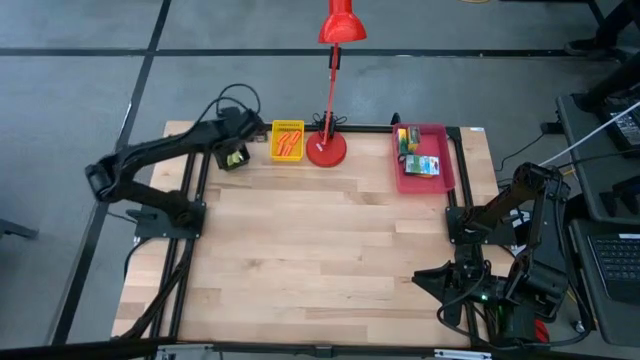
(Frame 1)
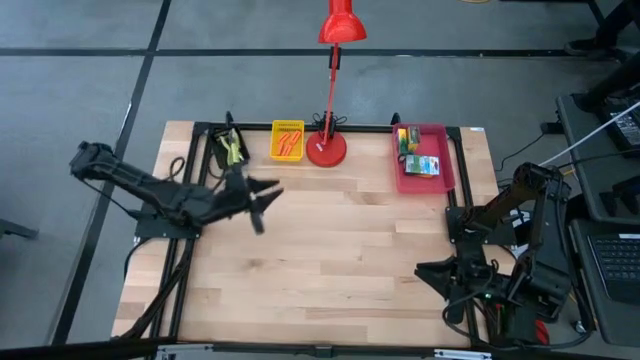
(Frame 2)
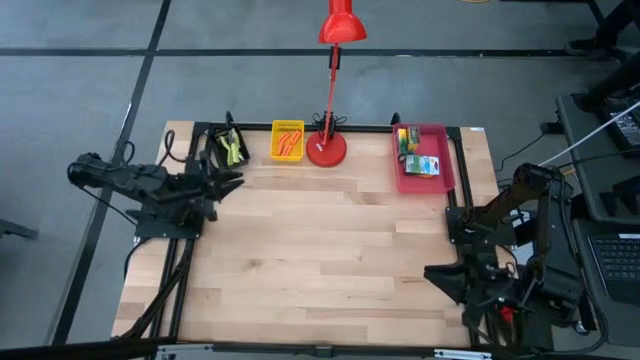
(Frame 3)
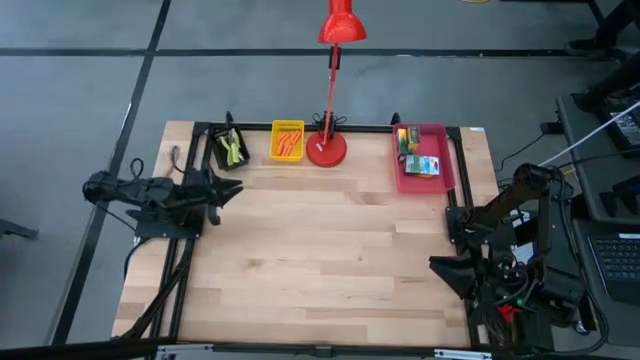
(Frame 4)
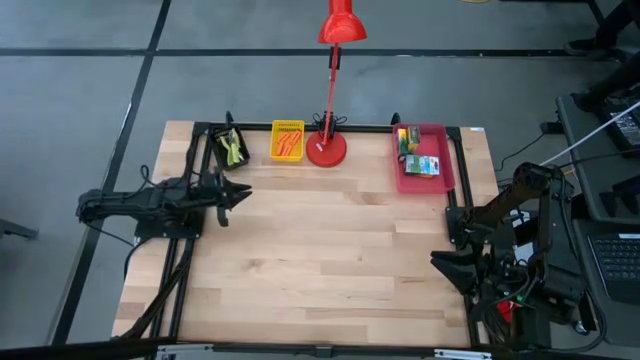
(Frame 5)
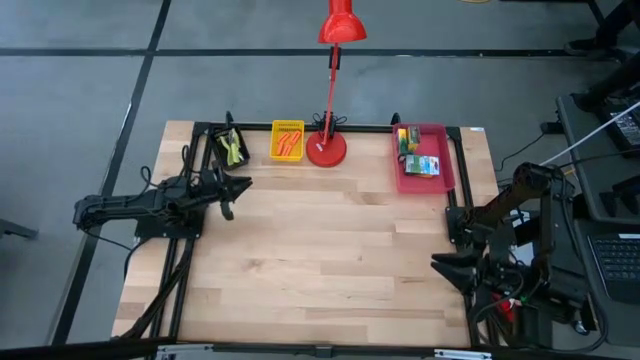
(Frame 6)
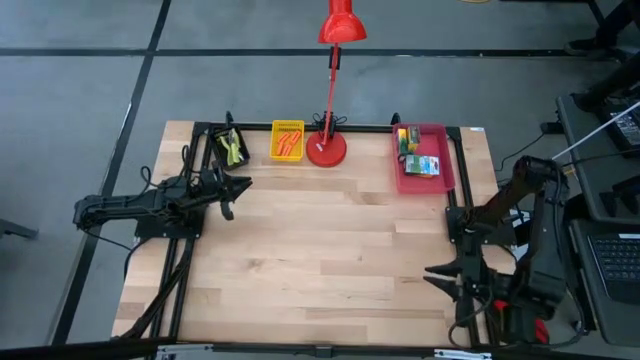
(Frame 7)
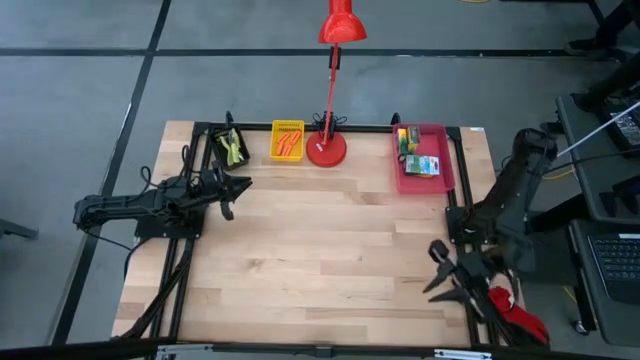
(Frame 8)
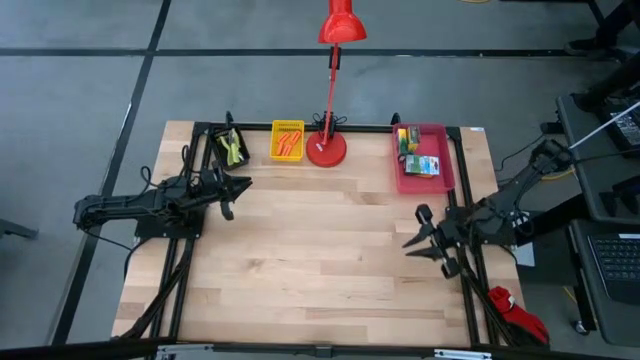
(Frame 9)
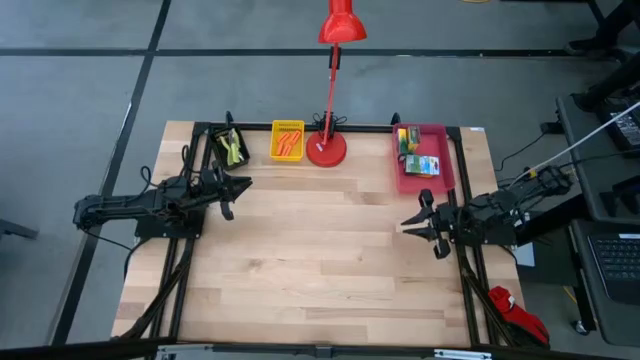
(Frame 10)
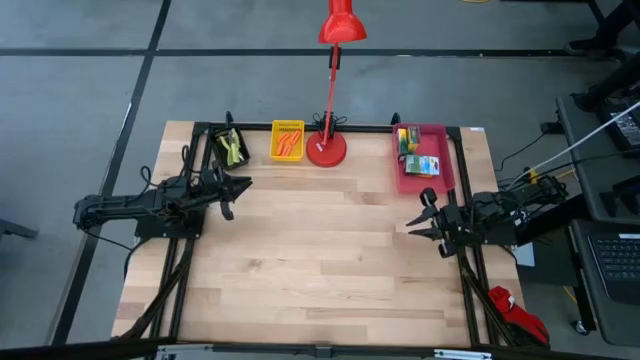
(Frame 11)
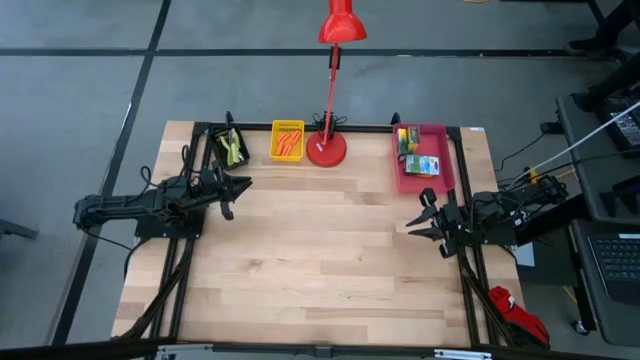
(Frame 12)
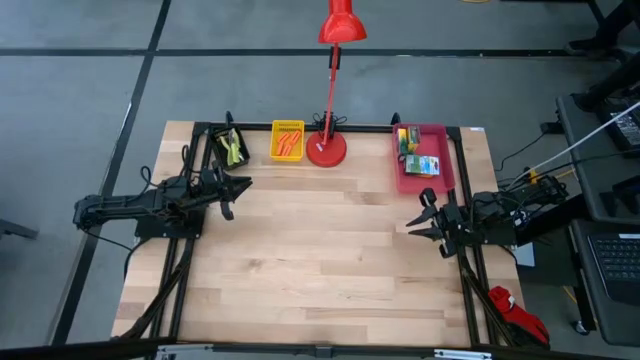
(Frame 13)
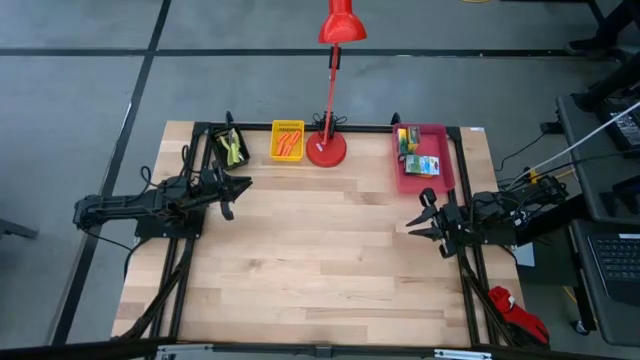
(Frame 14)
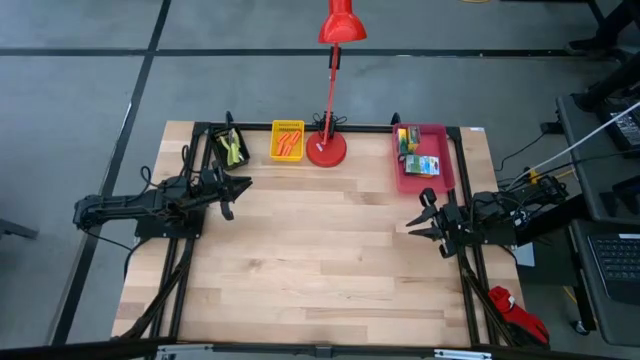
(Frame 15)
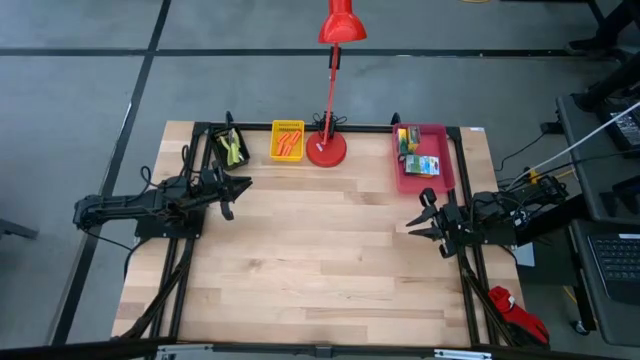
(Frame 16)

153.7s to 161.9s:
Task: Pick & Place School Supplies
Return to Home Position

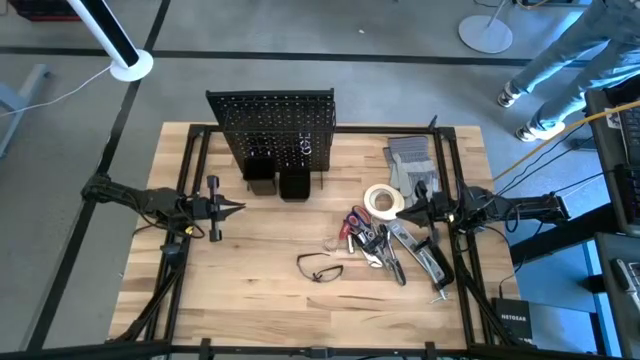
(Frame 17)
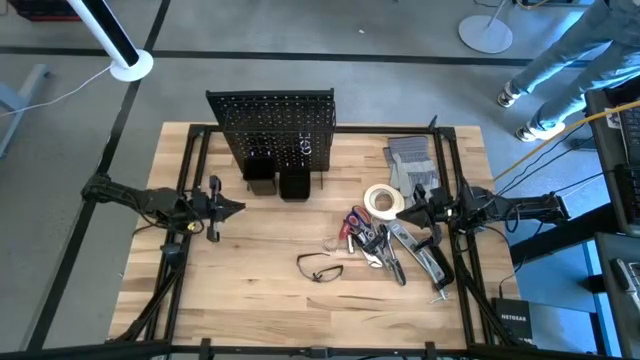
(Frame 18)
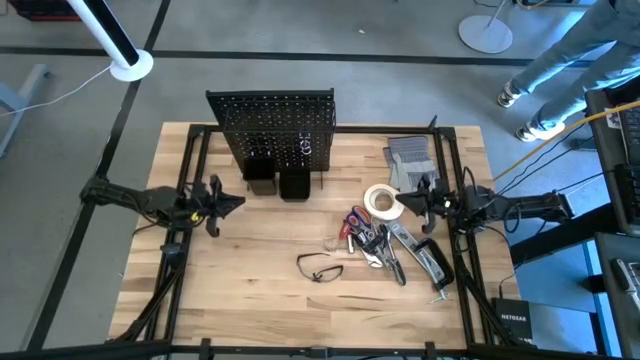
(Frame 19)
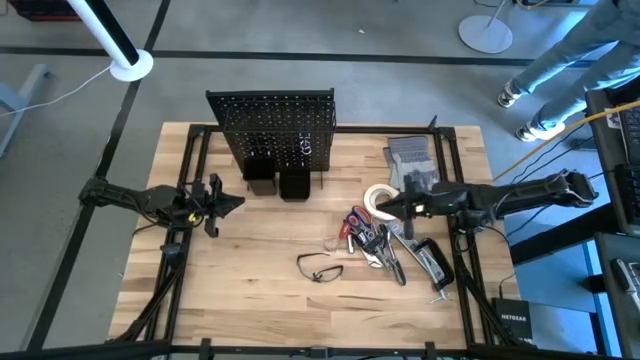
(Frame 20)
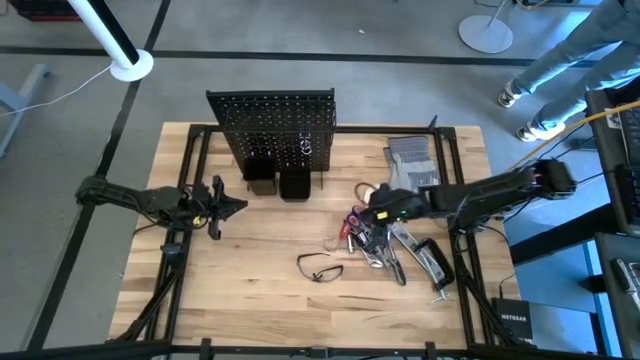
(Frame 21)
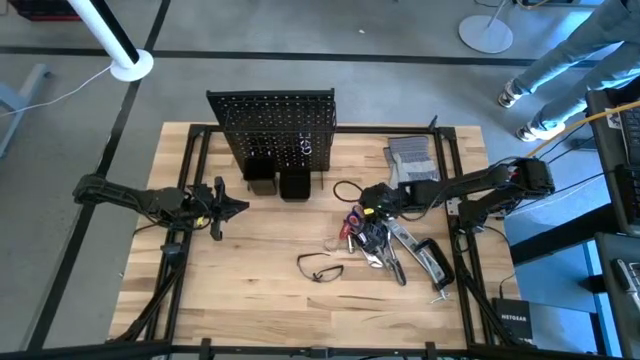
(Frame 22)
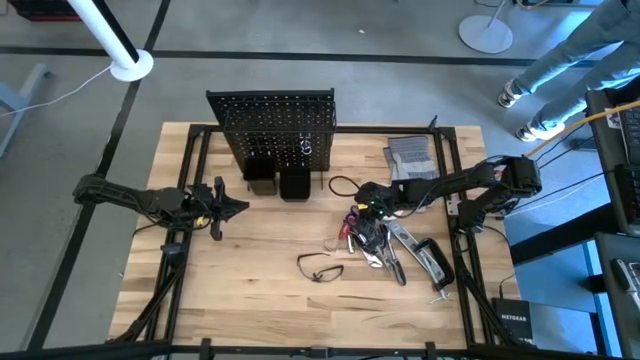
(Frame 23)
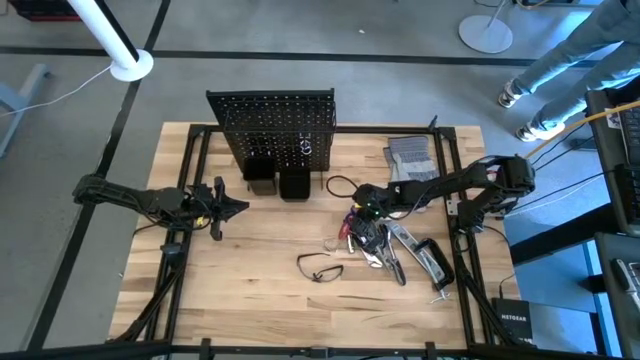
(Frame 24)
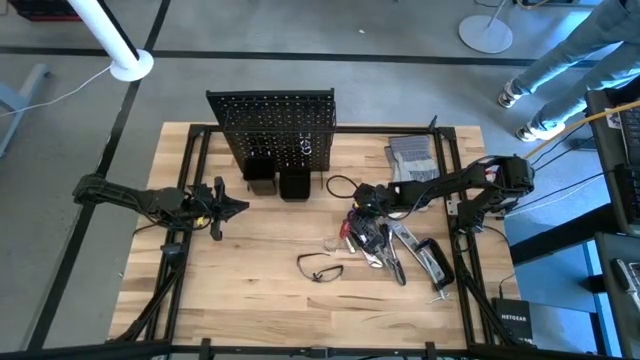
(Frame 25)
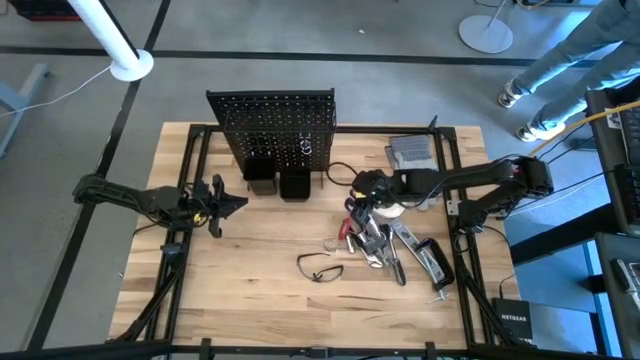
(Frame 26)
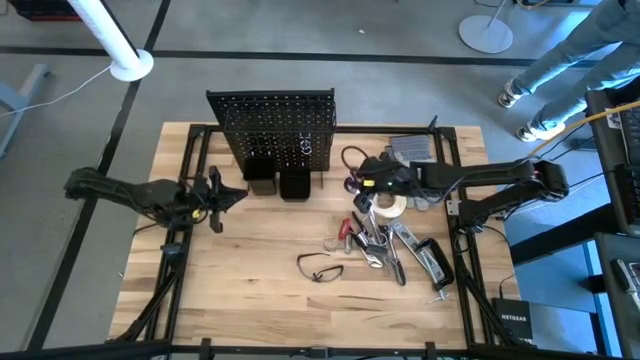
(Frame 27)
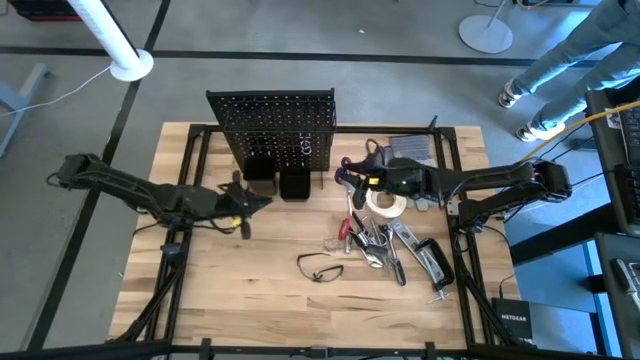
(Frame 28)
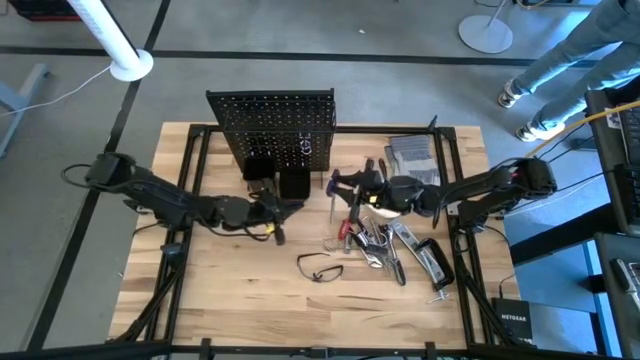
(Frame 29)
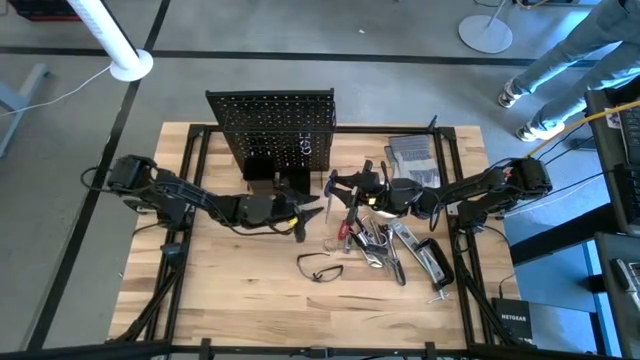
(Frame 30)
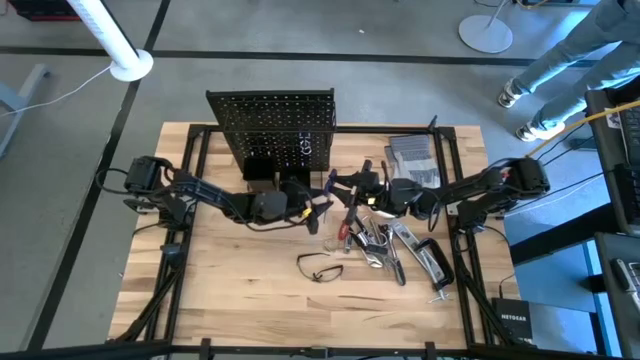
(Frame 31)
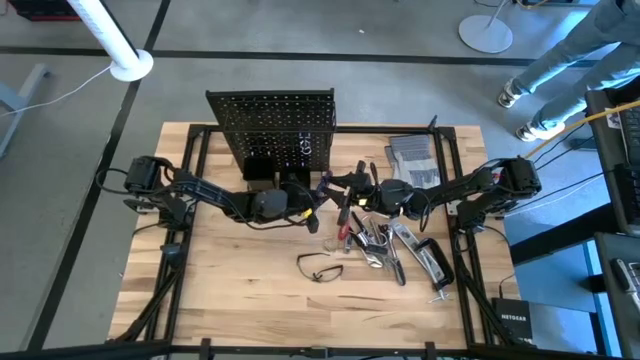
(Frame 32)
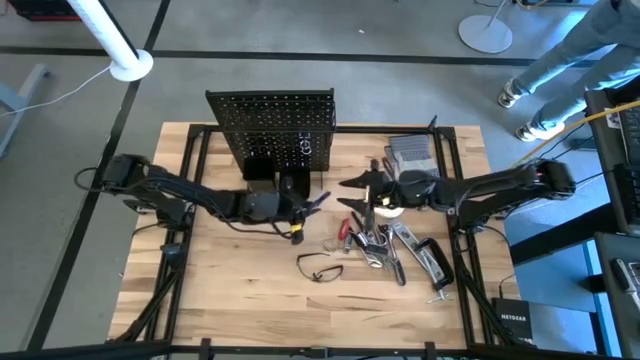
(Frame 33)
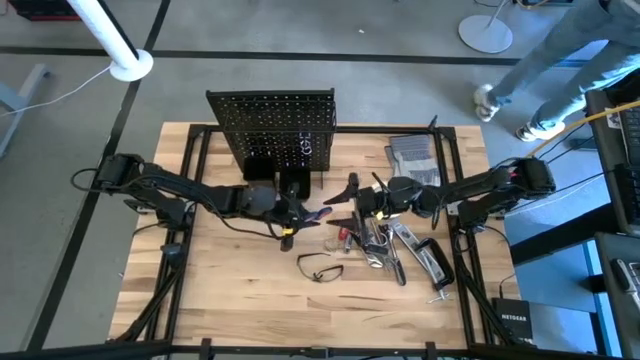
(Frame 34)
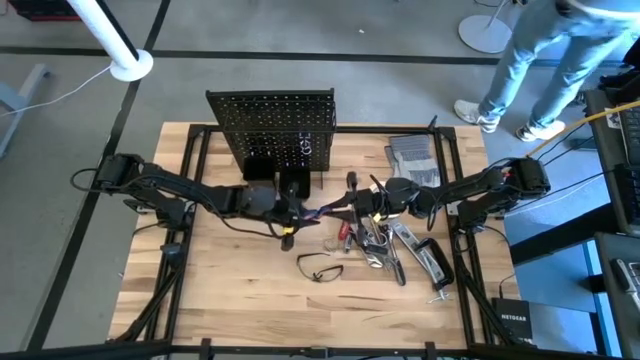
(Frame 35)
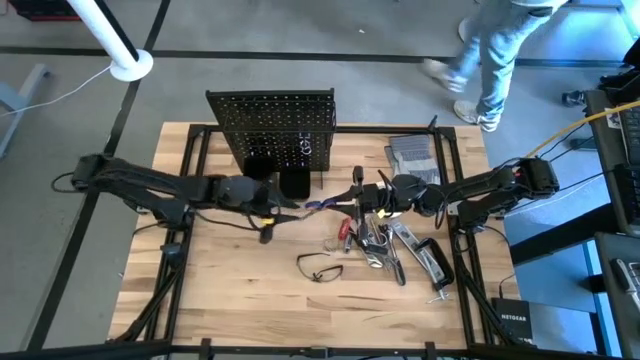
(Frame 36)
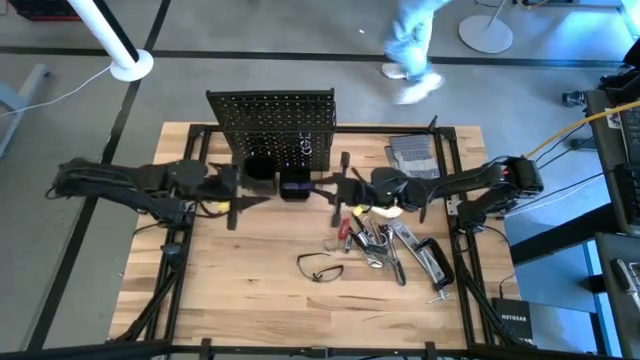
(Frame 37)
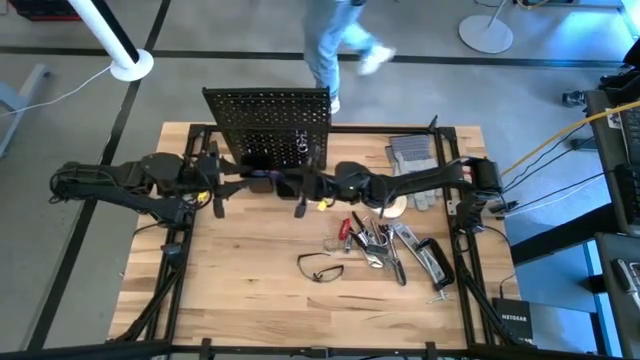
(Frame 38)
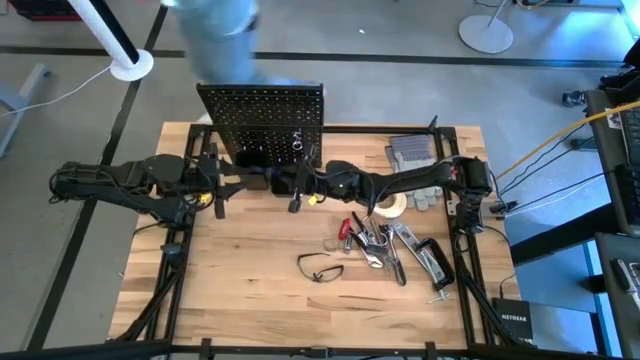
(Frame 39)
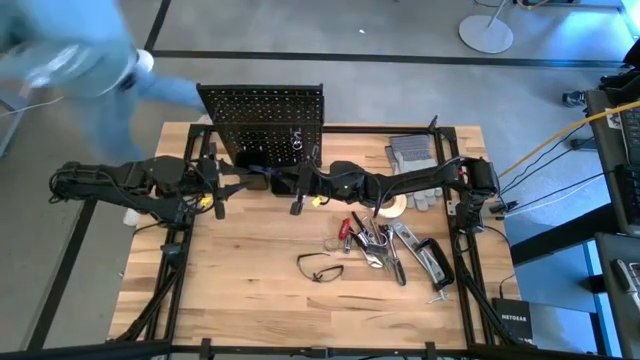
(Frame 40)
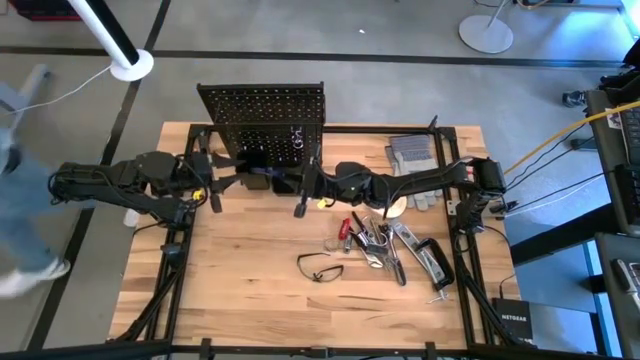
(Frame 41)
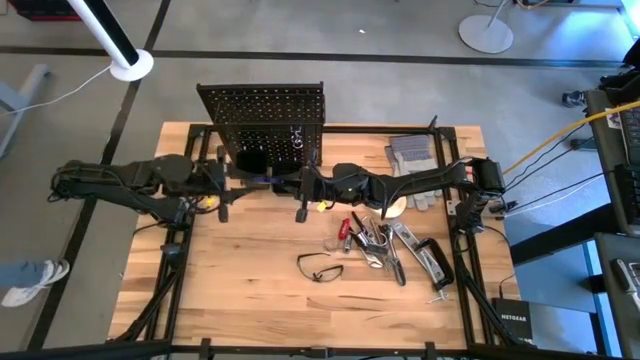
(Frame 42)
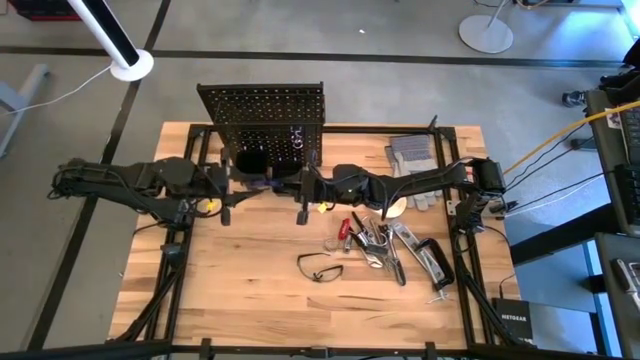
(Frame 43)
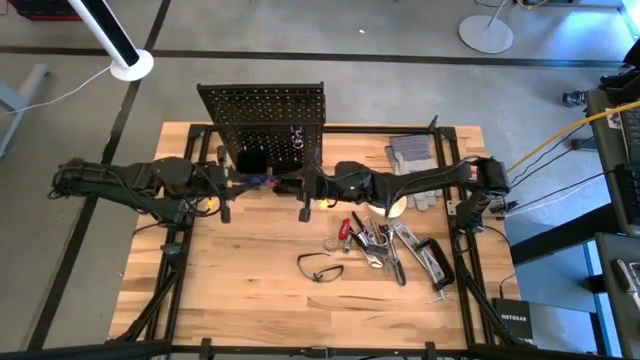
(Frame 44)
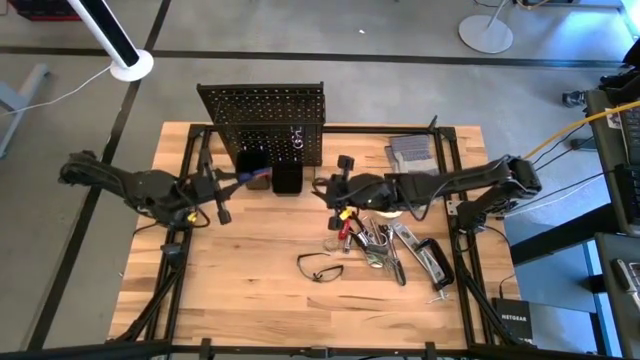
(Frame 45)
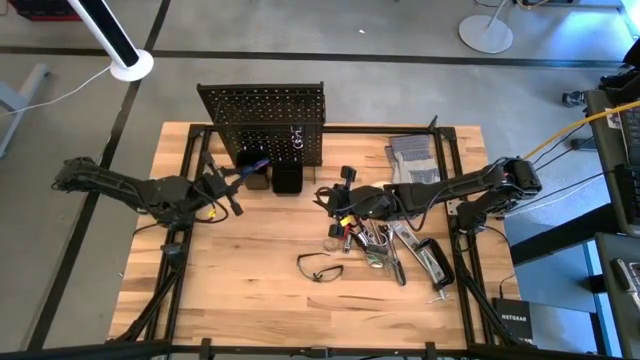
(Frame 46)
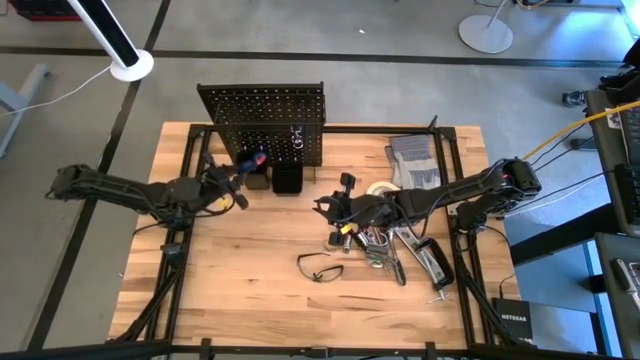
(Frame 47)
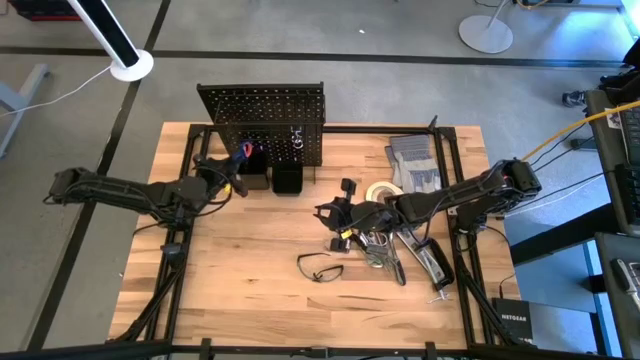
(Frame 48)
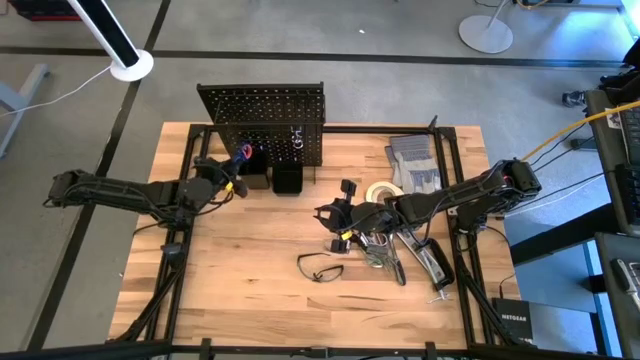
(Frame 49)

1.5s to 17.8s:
Task: Hang tools onto peg board
Put the scissor into the left pegboard organizer bin
